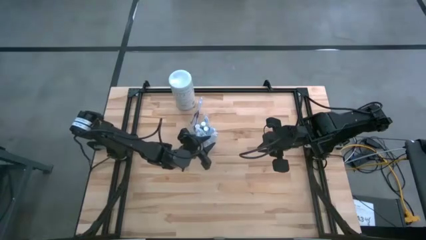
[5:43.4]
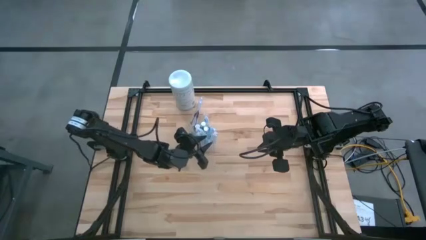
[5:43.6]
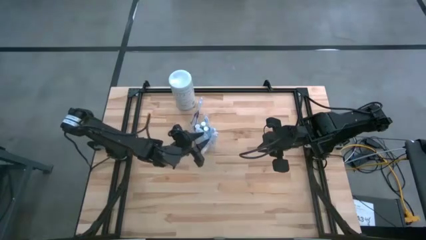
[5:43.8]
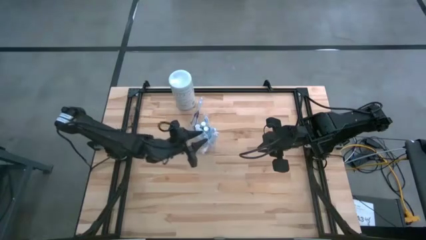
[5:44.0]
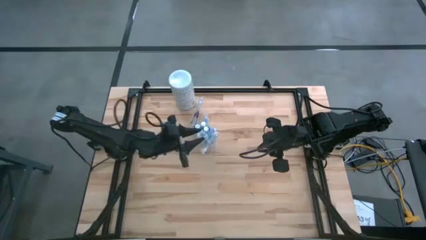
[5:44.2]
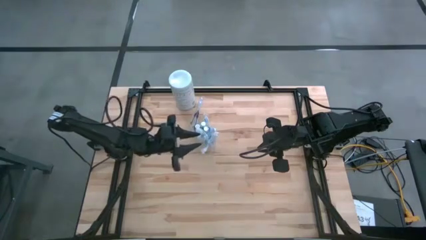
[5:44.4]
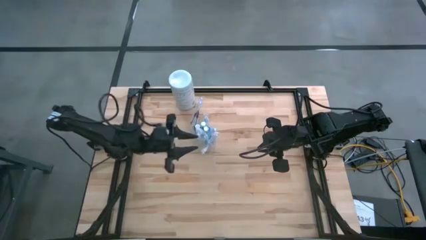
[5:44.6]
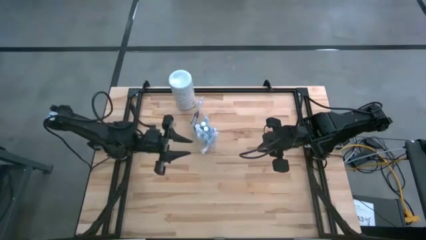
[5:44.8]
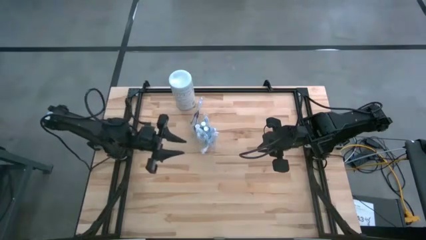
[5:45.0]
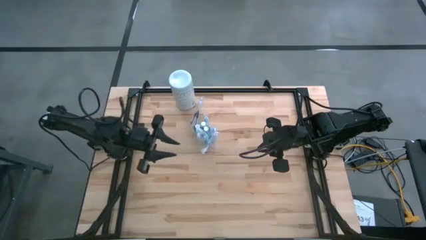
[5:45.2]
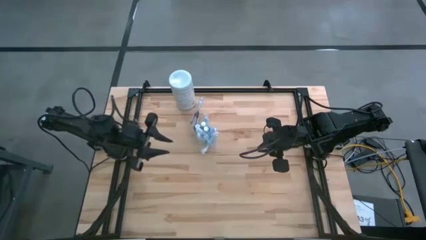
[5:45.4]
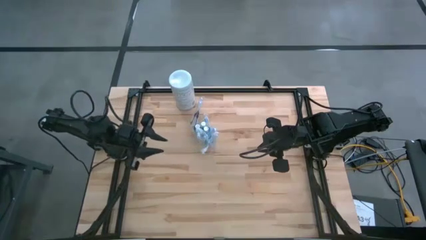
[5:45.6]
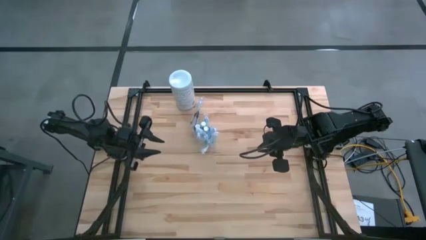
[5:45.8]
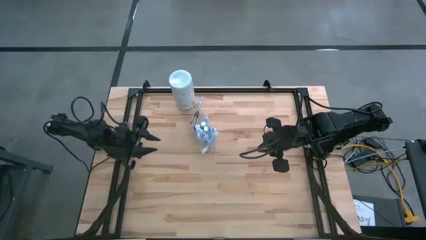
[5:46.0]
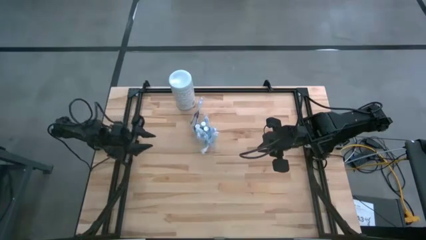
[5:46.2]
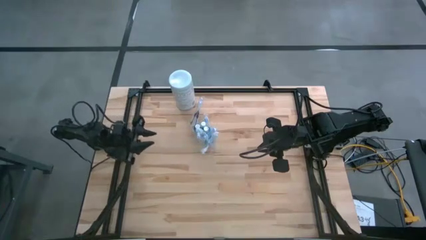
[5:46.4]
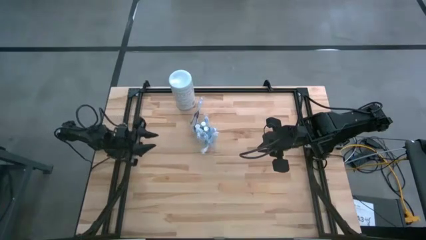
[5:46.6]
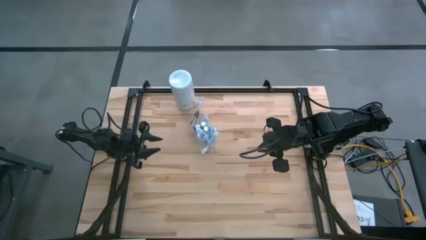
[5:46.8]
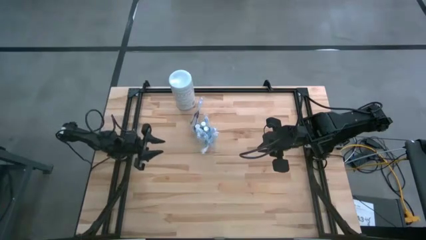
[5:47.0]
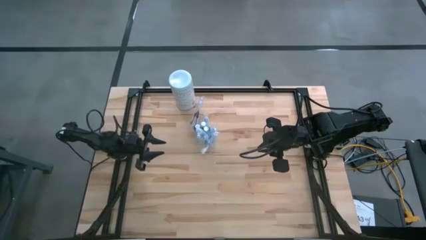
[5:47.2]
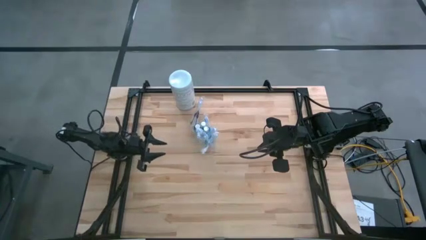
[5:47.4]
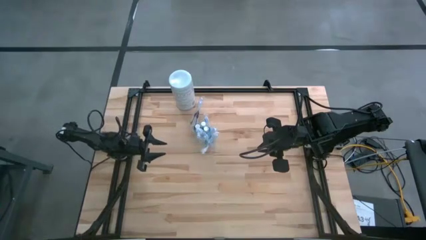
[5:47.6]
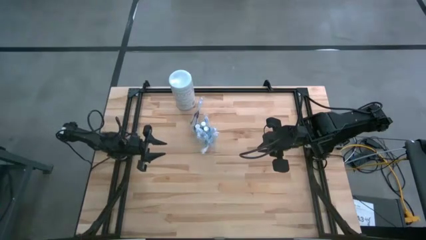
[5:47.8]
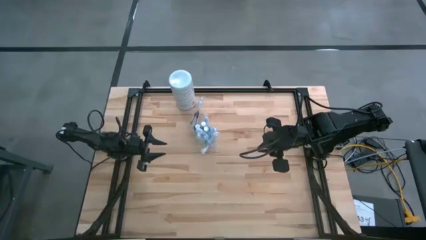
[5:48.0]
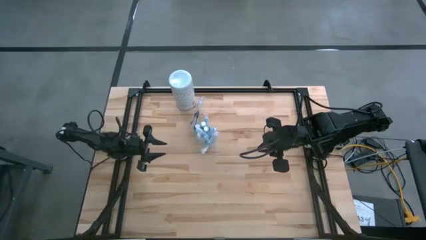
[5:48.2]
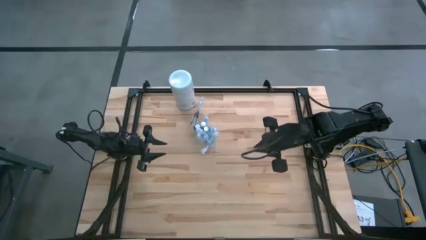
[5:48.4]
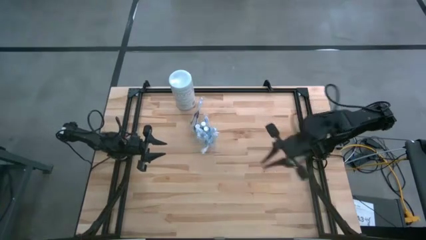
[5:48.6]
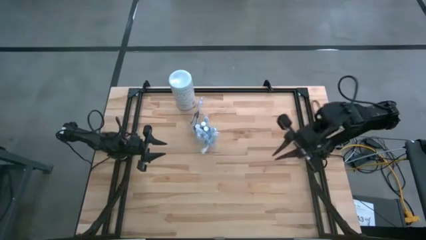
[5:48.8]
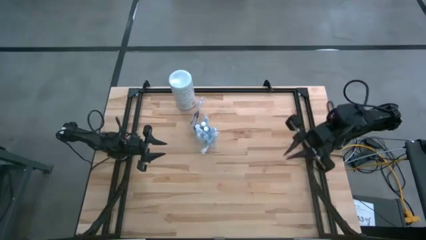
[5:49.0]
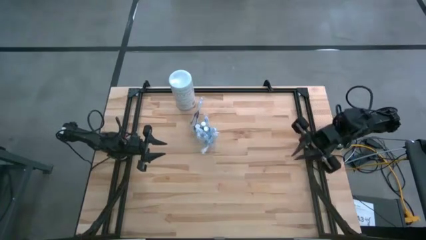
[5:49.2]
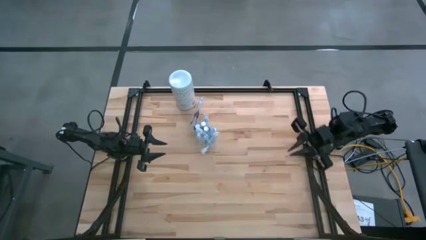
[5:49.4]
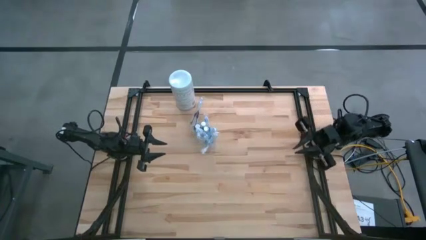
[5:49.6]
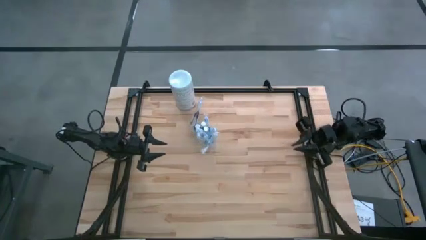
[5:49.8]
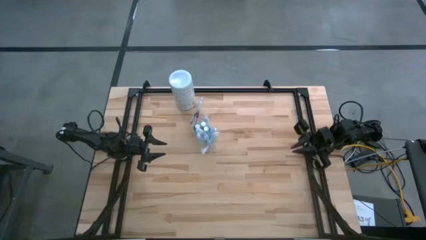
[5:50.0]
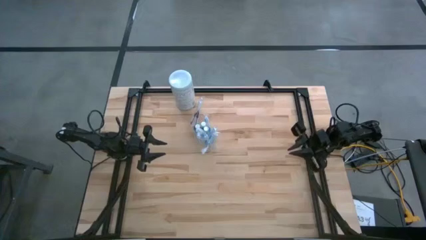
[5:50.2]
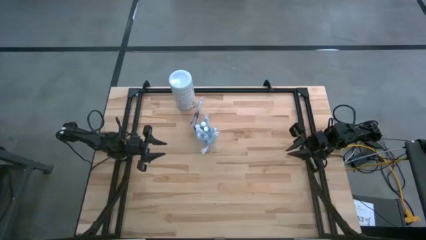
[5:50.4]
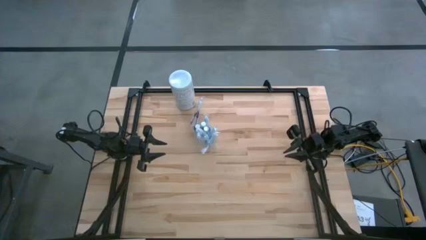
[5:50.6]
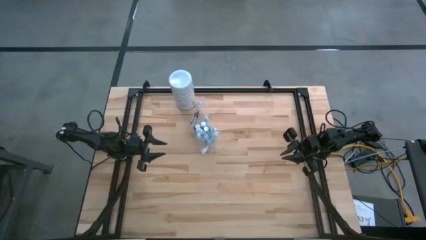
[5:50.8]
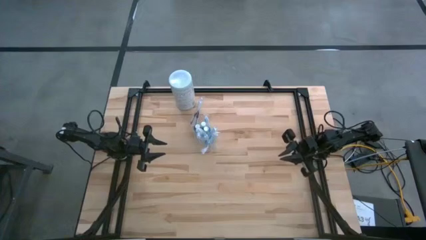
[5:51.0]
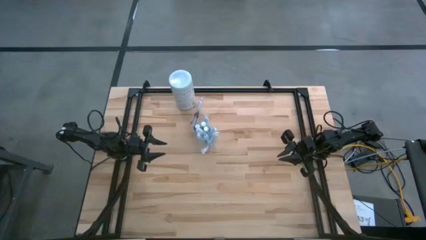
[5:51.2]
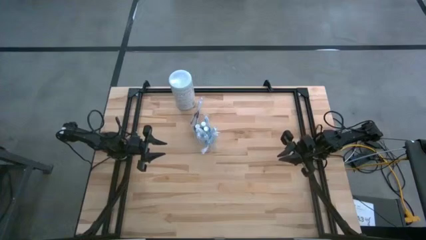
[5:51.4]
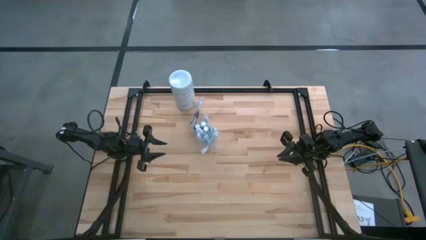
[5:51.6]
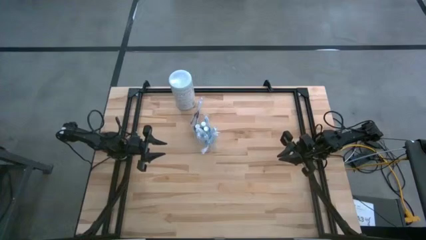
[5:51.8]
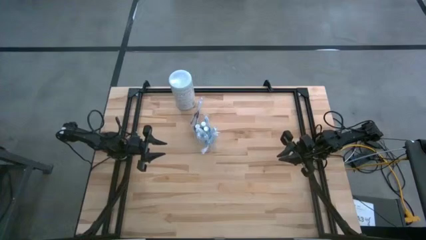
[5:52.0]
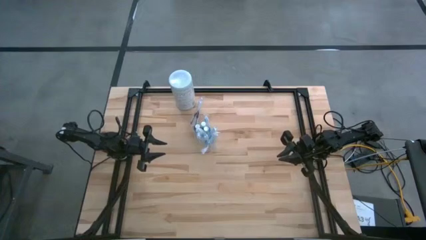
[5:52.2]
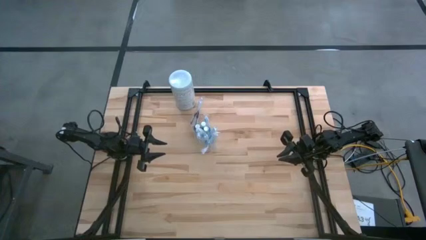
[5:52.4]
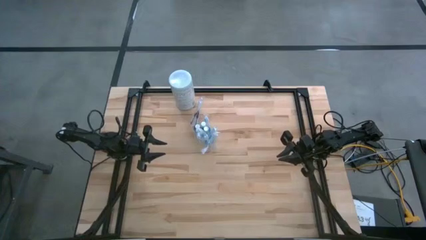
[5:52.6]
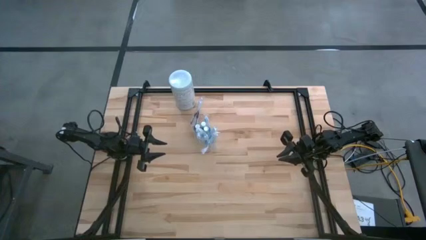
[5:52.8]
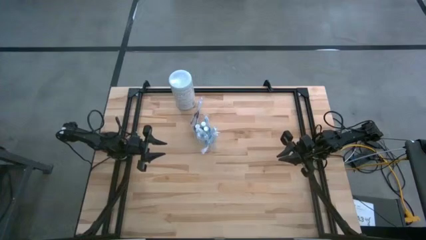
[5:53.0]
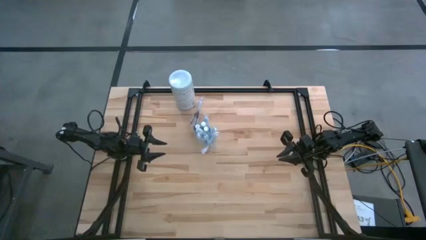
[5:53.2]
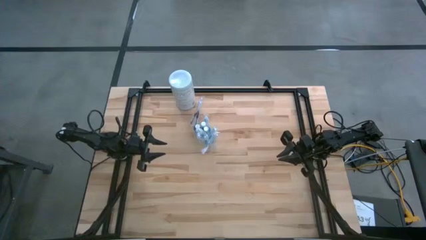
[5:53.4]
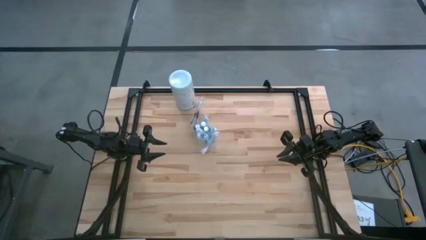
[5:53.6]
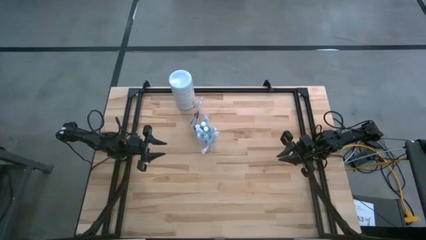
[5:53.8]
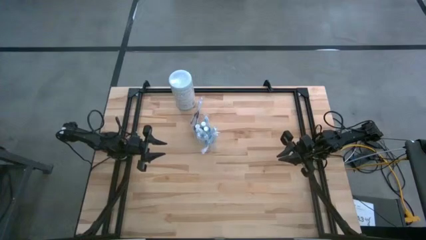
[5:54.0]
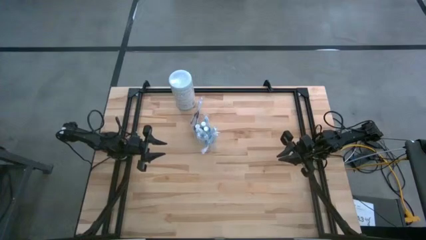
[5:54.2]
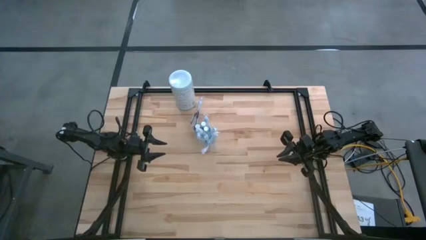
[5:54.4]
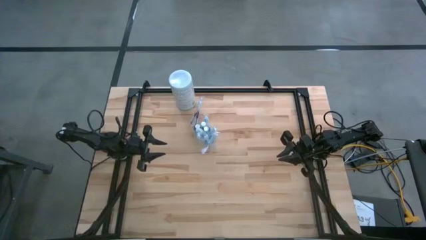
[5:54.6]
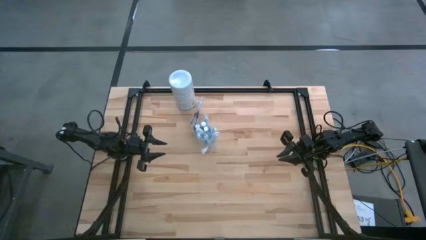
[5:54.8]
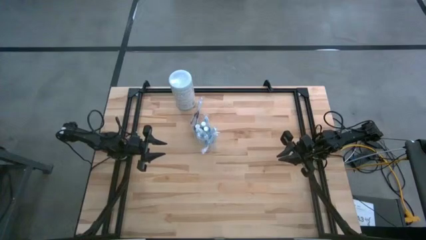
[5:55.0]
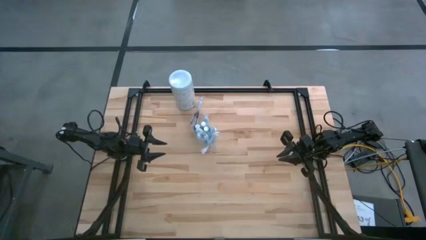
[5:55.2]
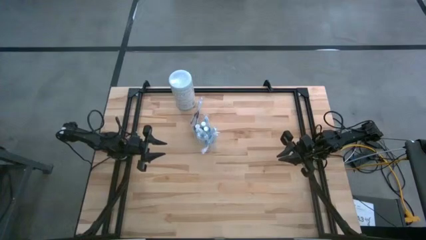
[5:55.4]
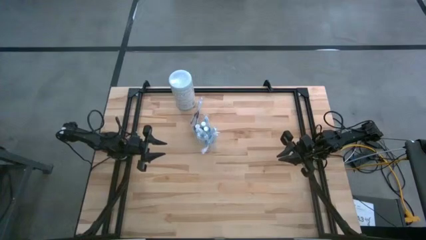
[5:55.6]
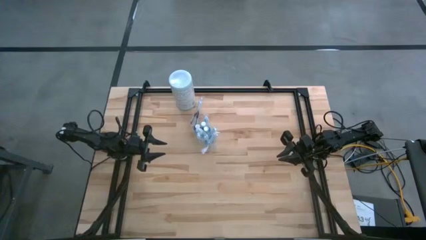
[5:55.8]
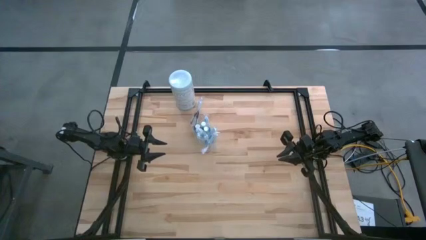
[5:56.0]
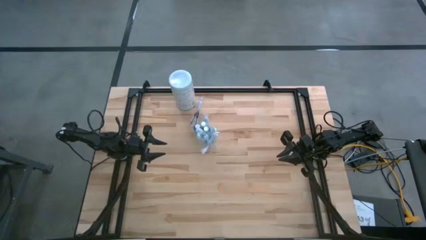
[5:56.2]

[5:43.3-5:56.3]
Task: Pick & Place toothbrushing station
Return to Home Position

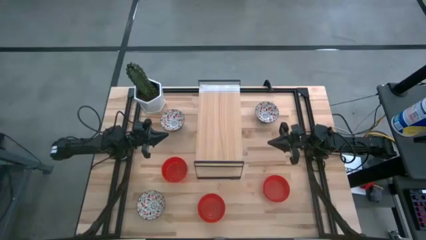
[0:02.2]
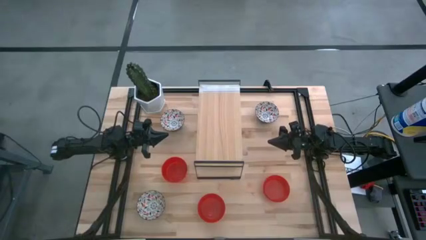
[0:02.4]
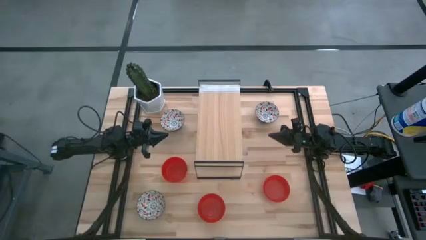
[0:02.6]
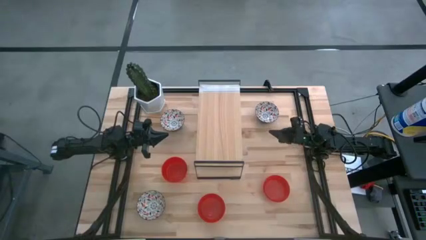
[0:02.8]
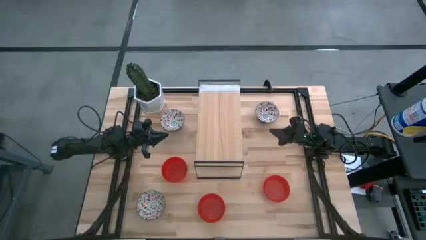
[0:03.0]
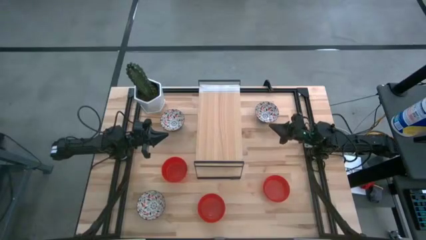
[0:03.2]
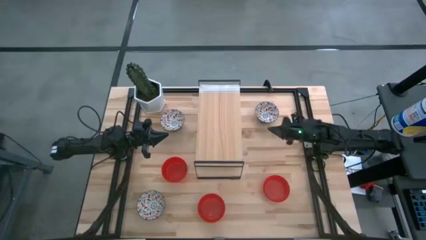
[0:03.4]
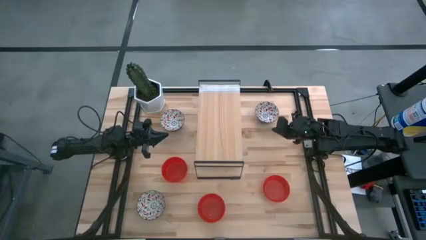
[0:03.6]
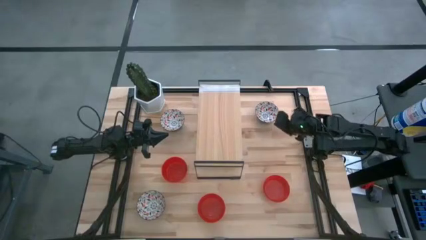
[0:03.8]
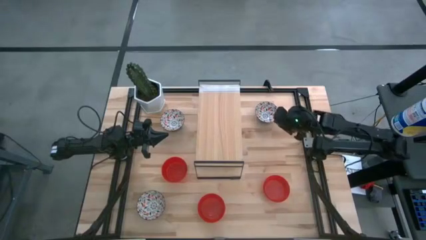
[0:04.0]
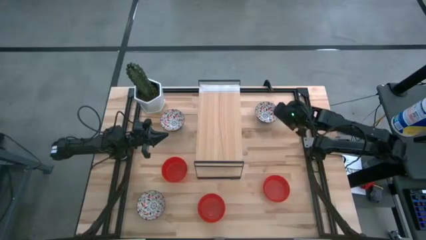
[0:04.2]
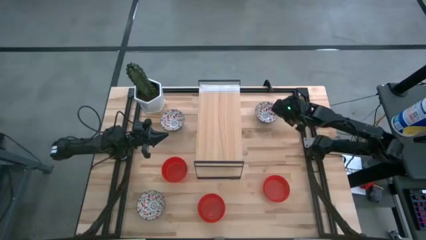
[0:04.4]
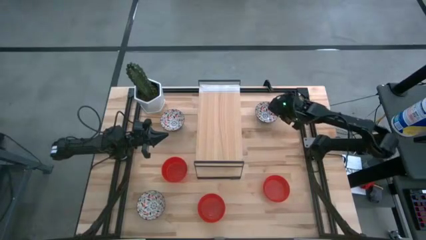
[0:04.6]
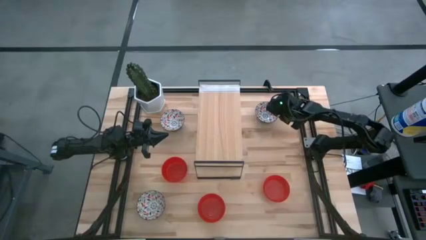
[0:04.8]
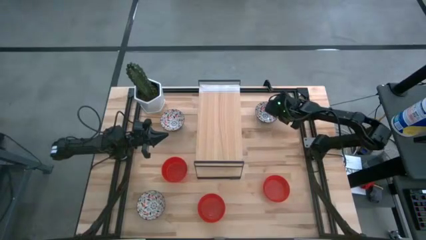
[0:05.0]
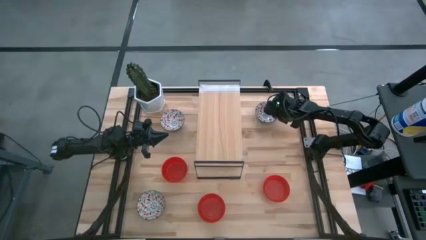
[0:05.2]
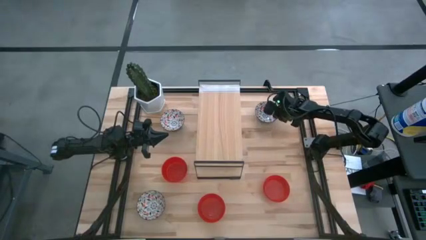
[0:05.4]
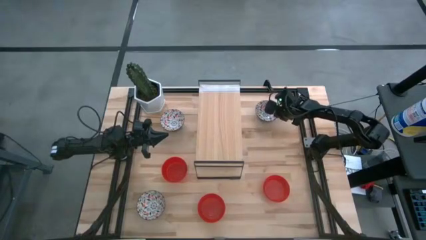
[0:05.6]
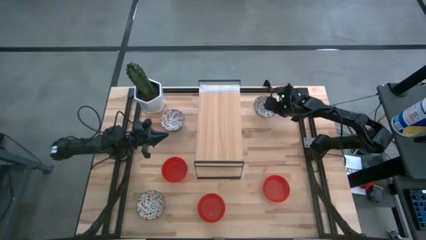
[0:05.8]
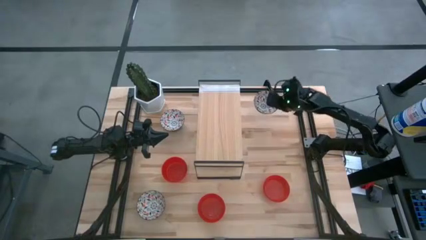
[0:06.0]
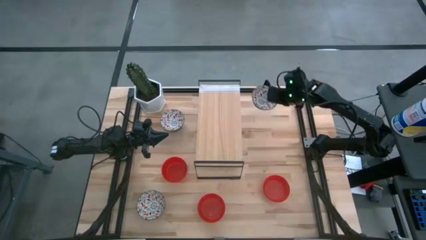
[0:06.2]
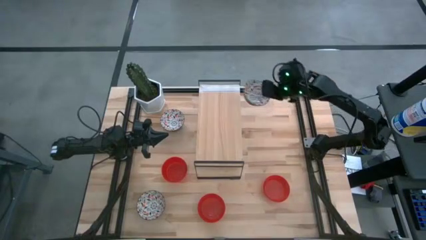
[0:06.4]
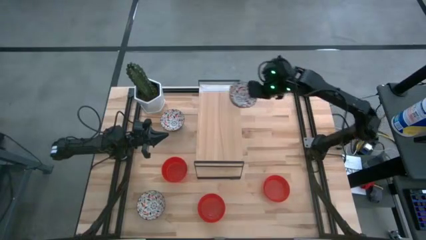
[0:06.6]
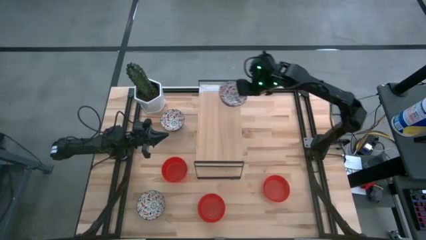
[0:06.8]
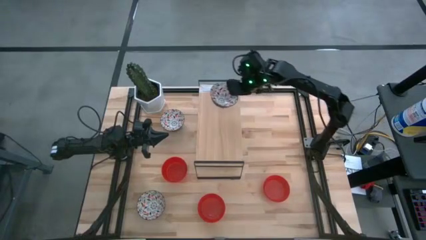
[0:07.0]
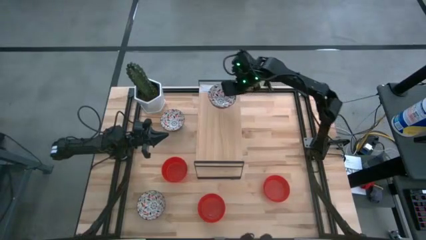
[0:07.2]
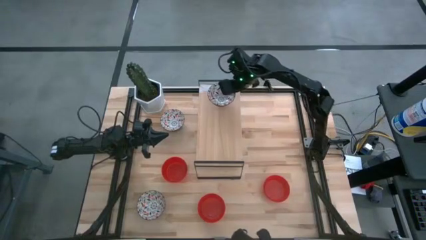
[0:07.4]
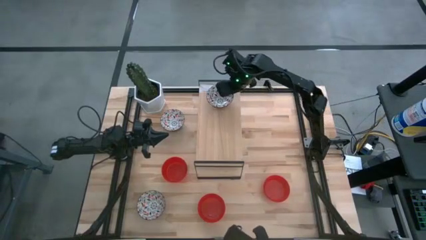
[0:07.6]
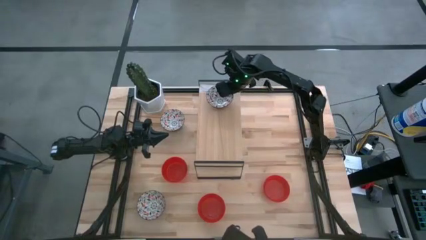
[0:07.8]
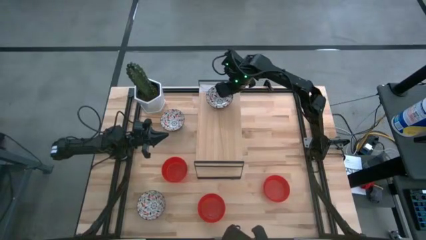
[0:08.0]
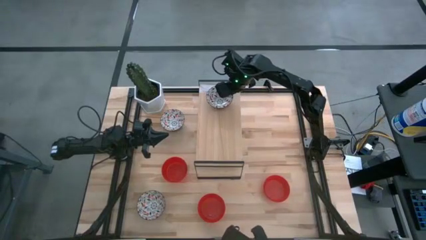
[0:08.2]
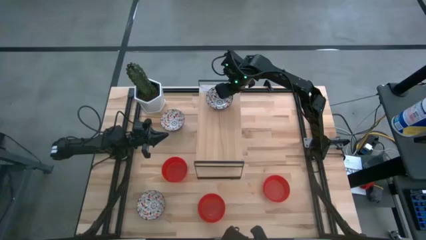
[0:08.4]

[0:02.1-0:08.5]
Task: Pick & Place Mini bowls
Put the top right white patterned bowl on the shelf
